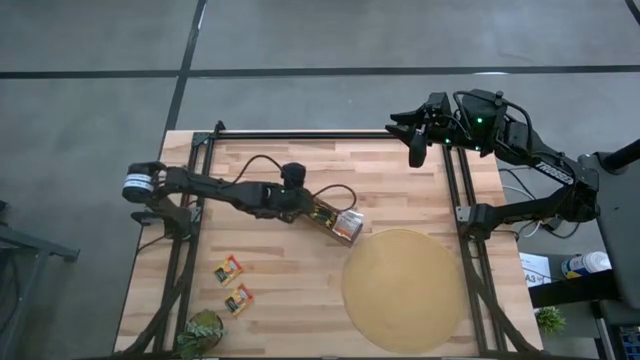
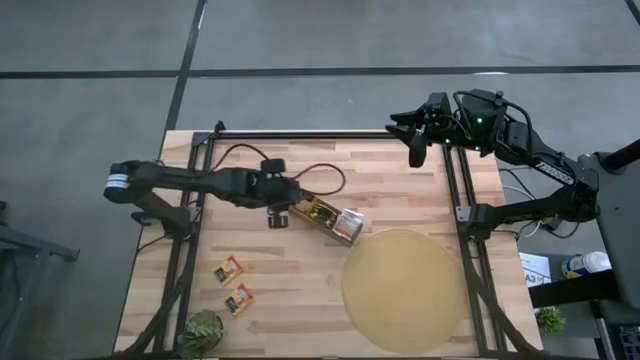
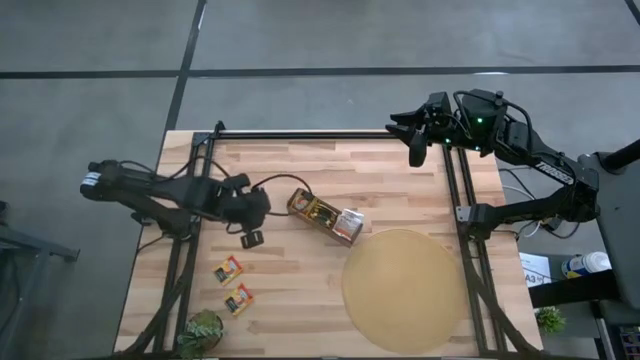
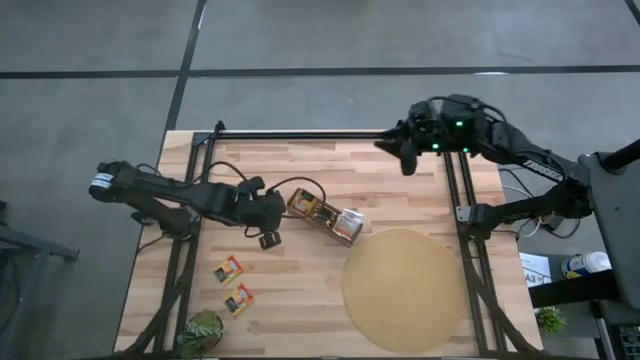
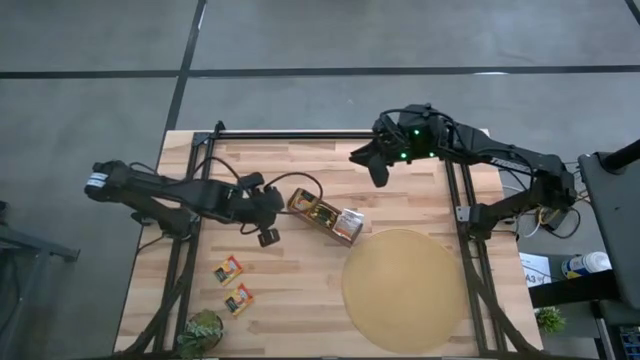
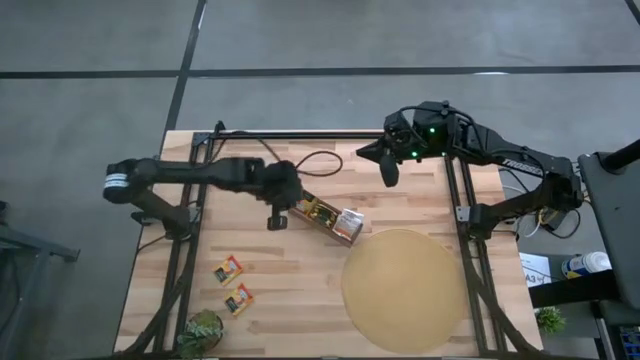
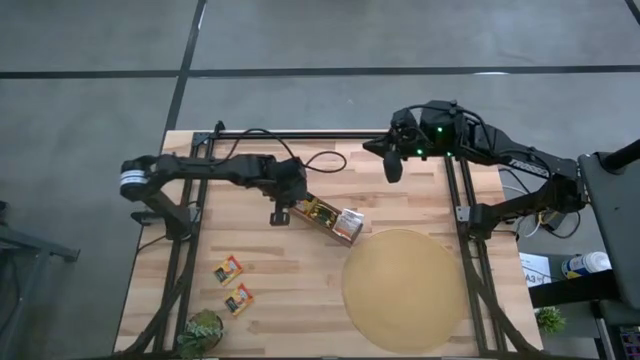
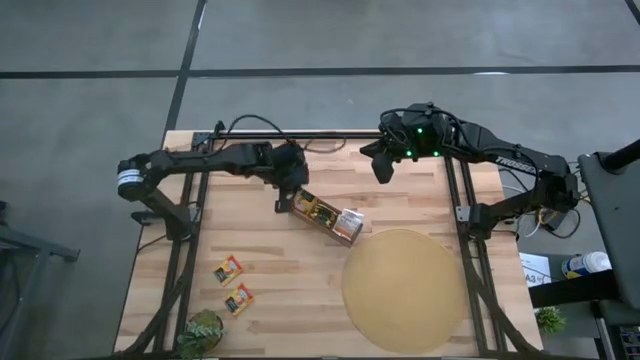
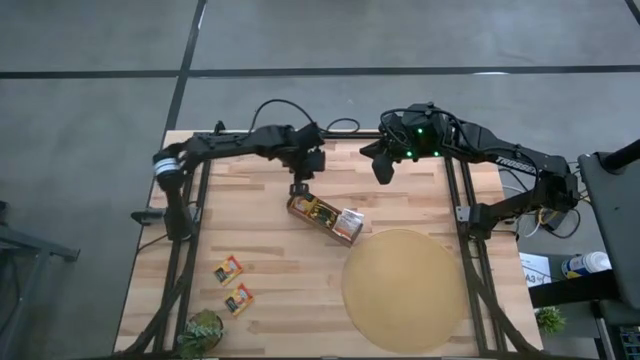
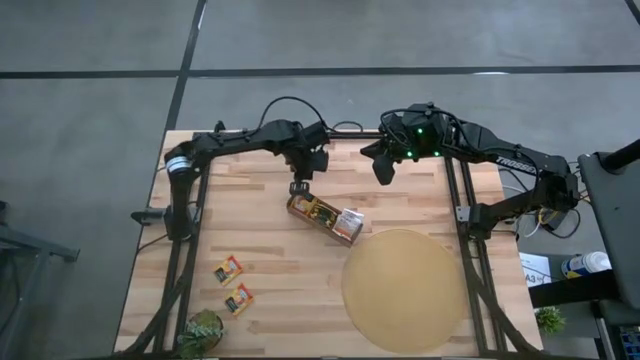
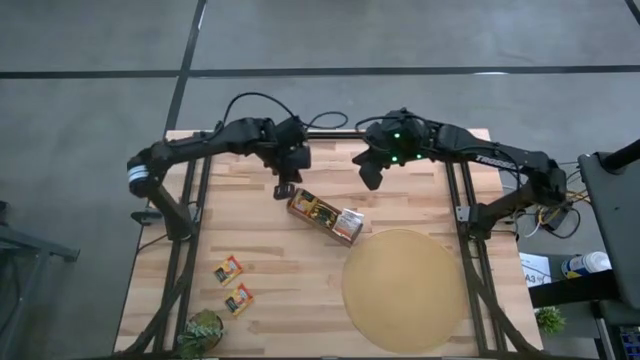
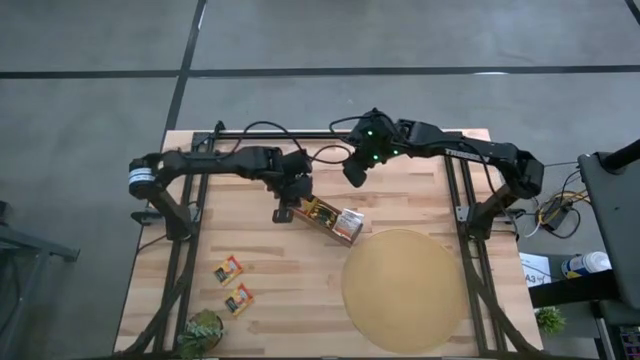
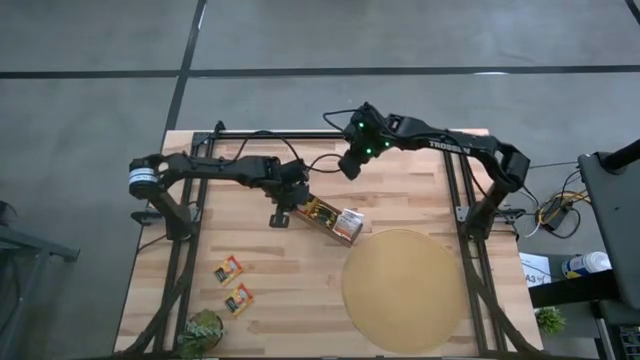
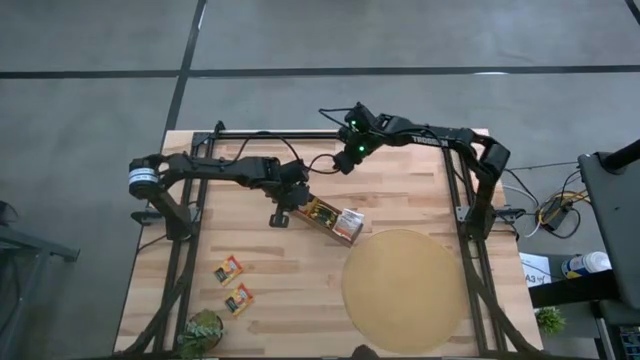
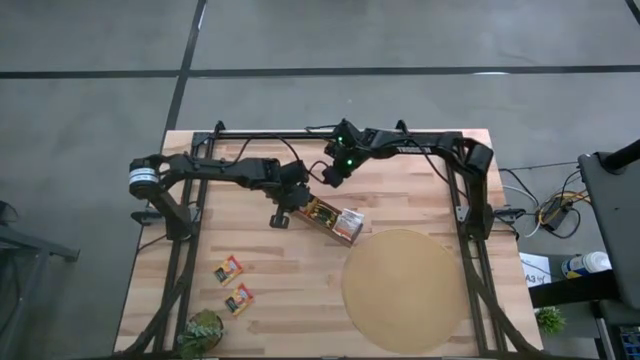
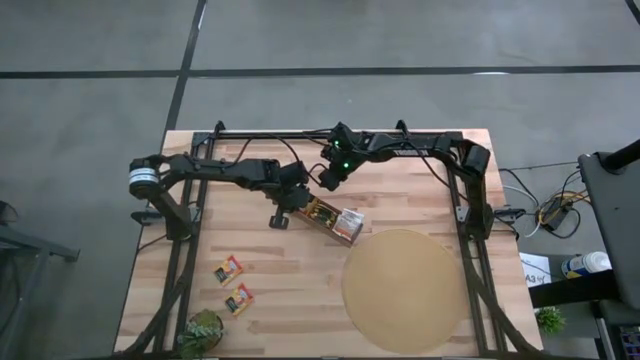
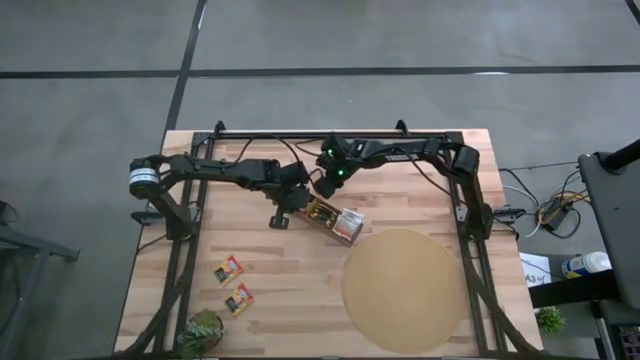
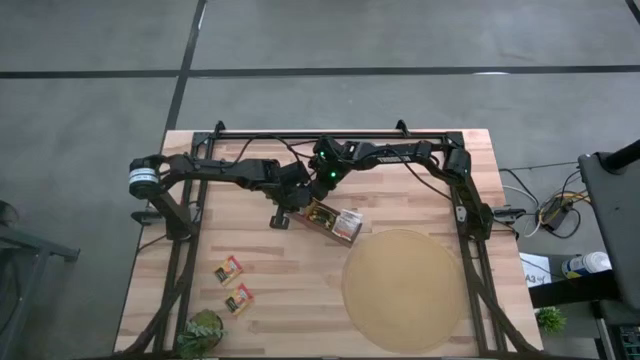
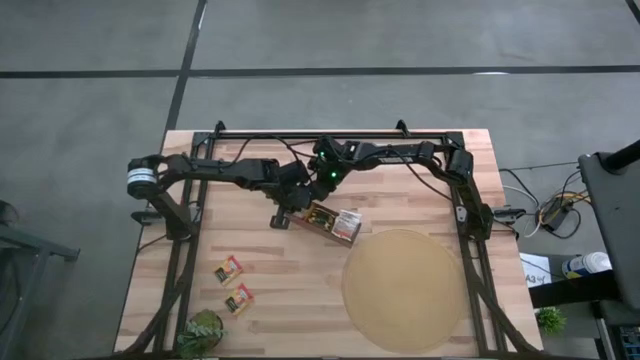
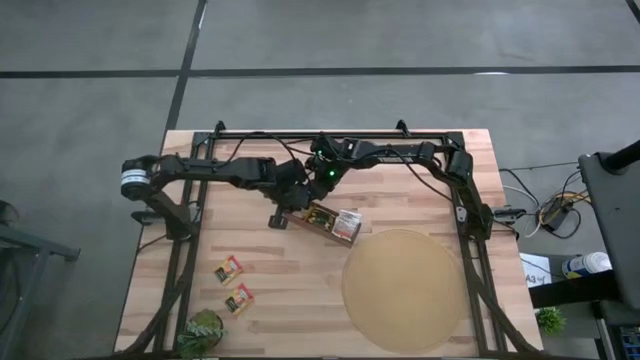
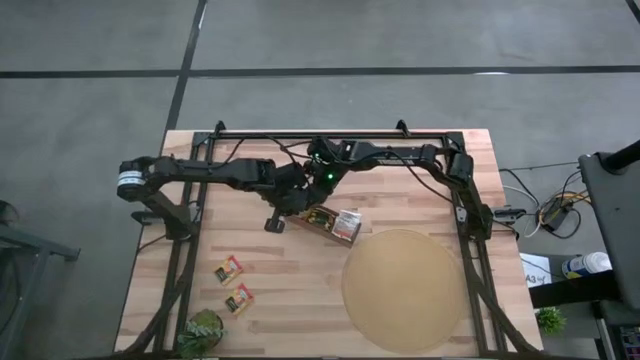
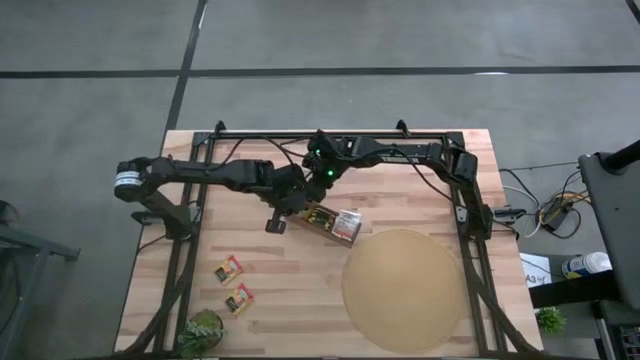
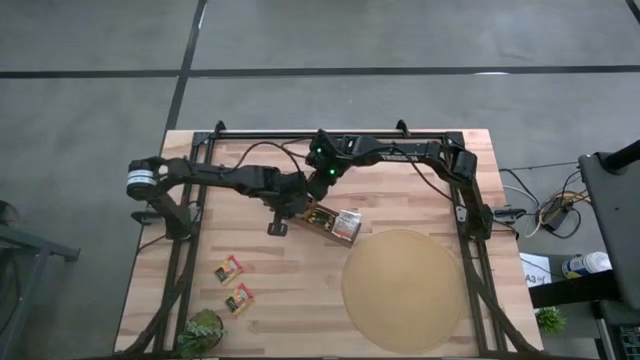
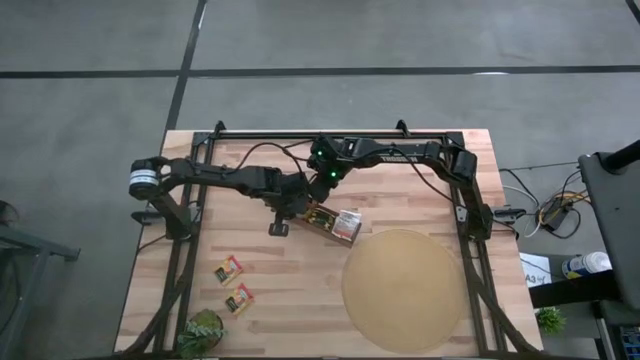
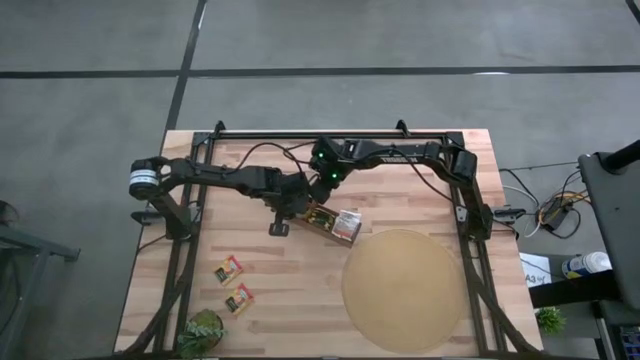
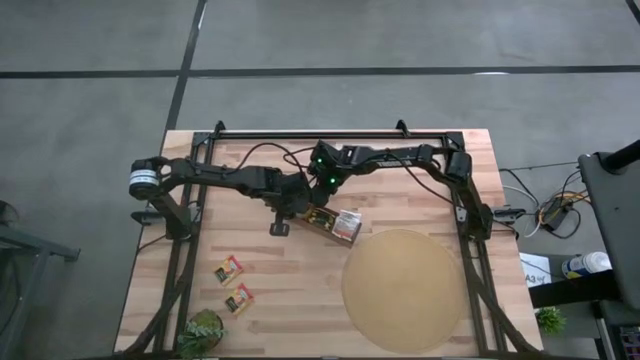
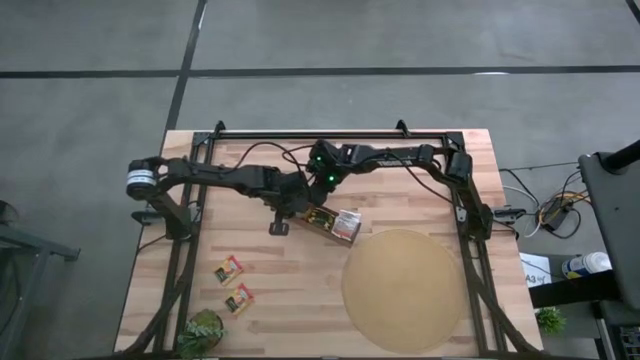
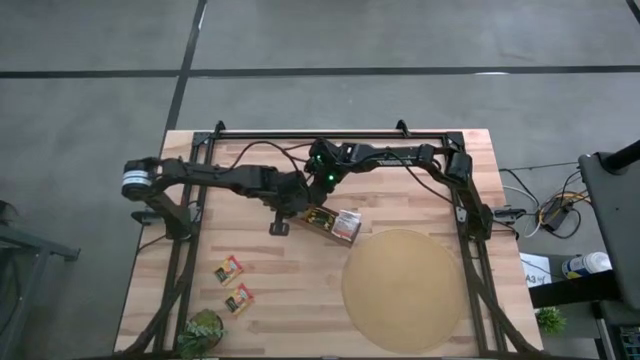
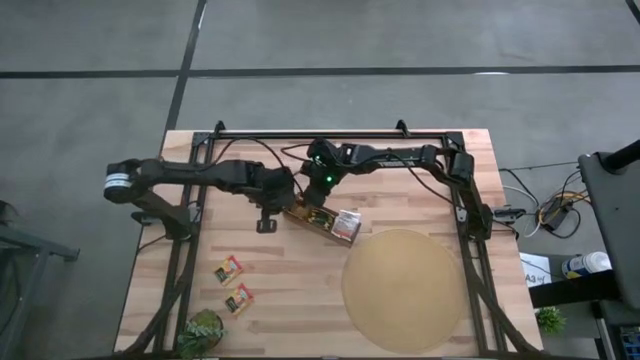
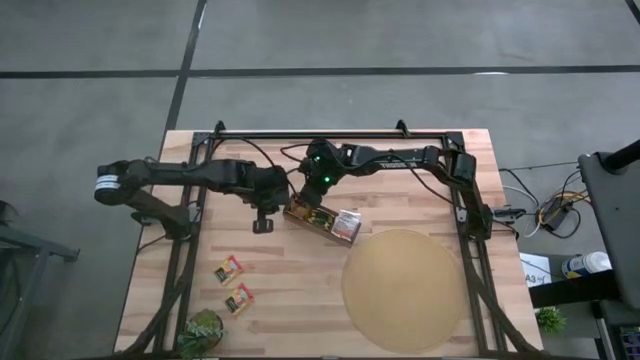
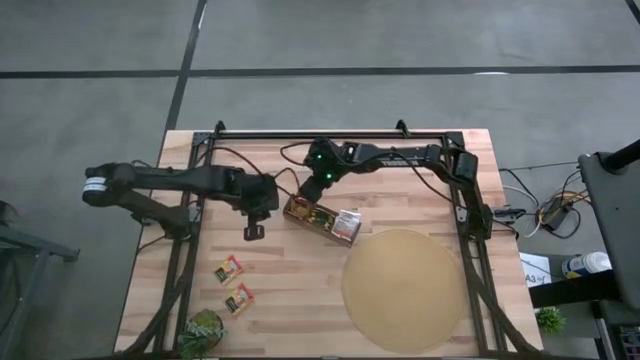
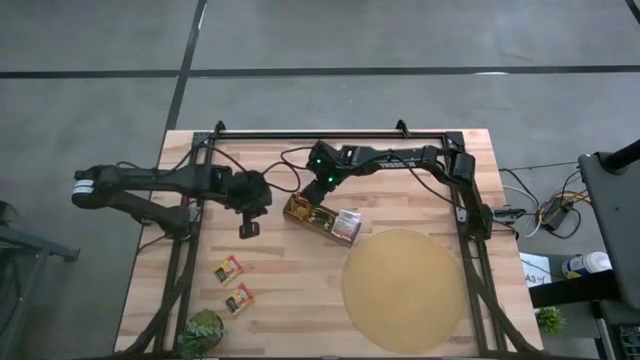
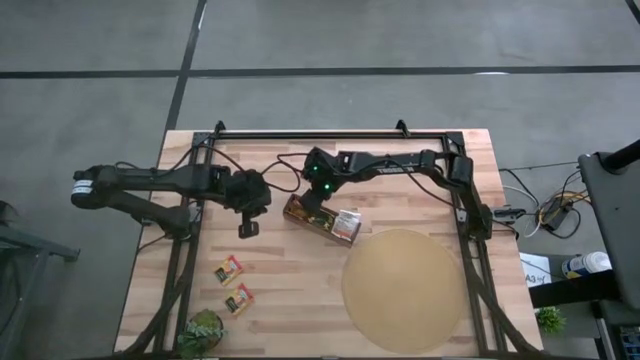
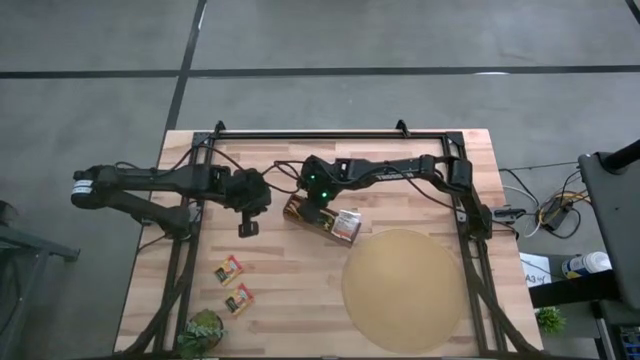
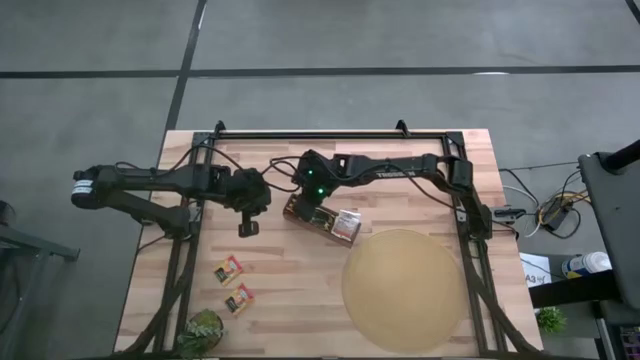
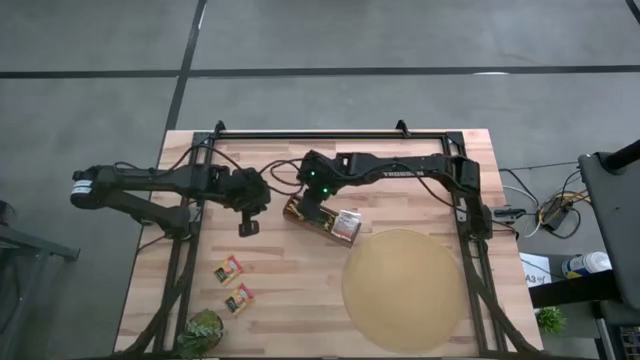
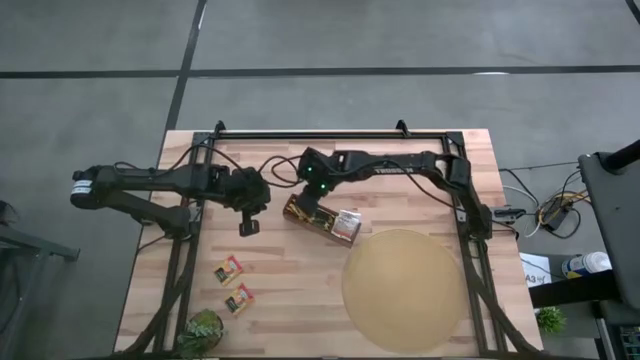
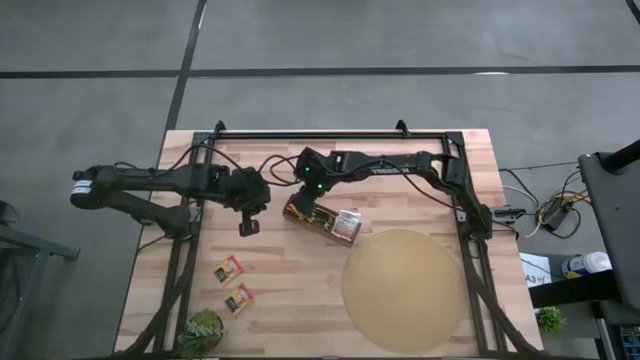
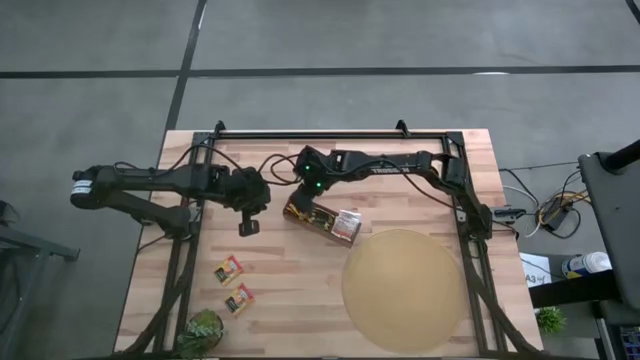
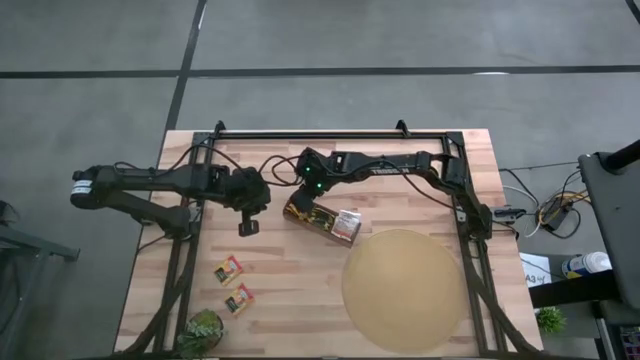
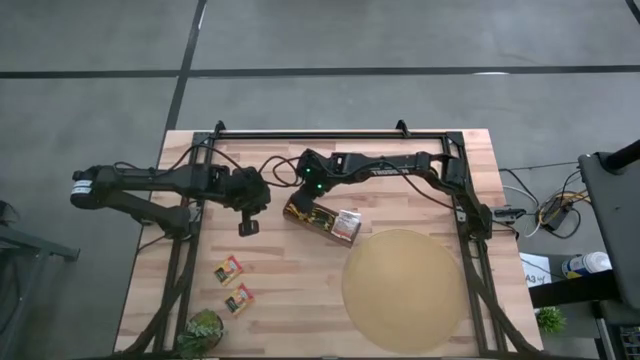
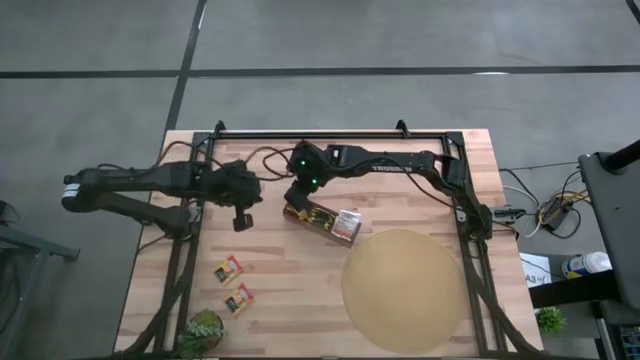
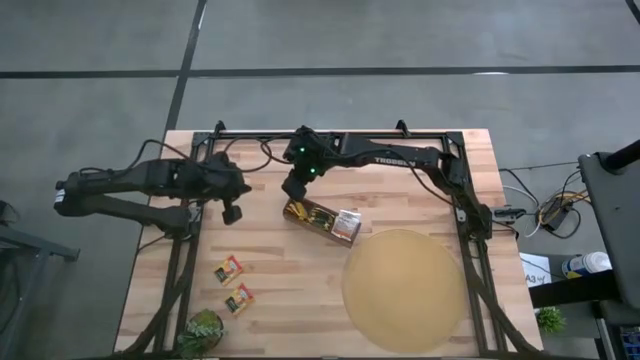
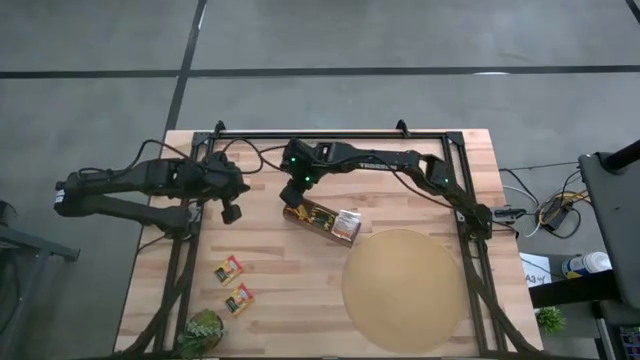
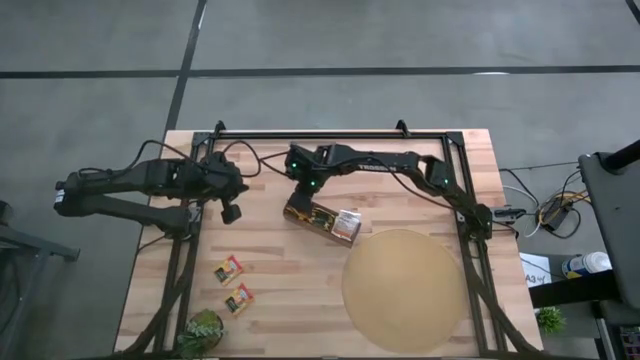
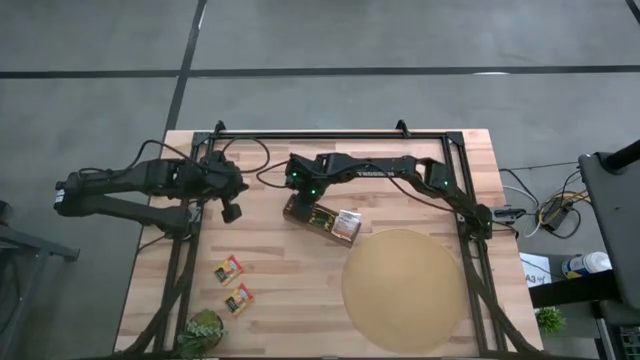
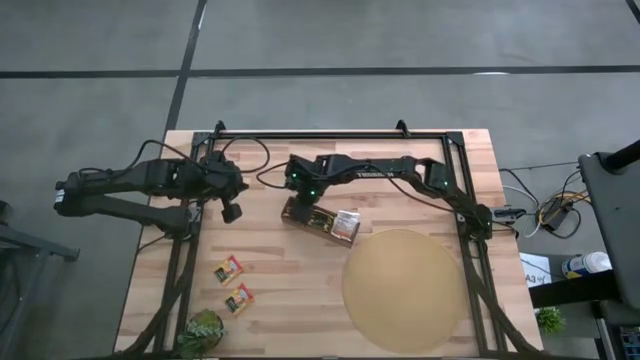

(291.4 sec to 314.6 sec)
Task: Pick & Place Tea
Adjust the orange tea bags in the wooden organizer
